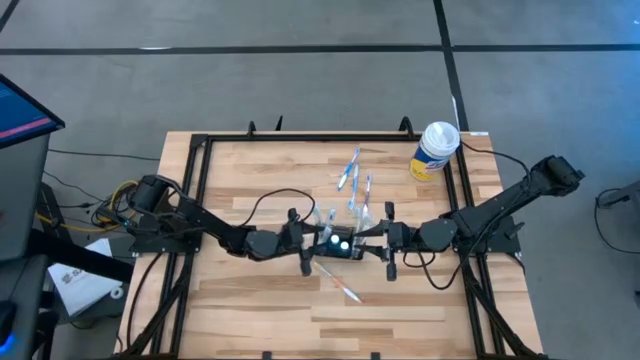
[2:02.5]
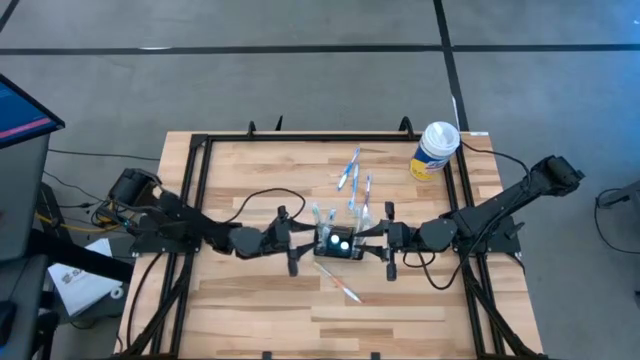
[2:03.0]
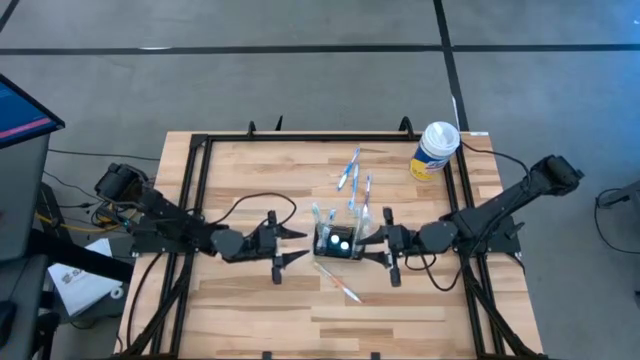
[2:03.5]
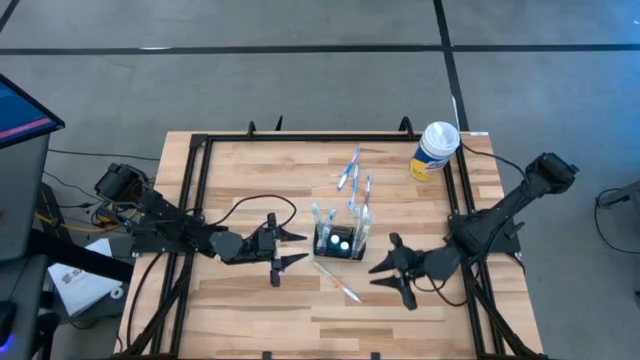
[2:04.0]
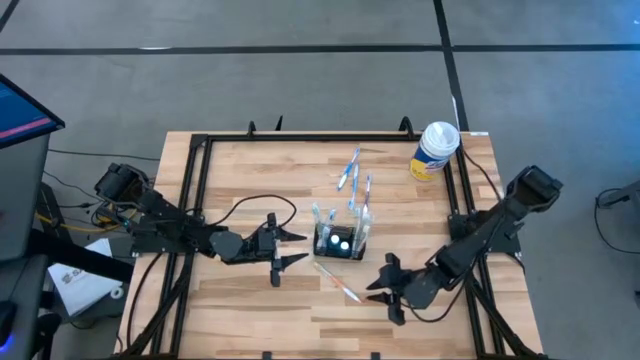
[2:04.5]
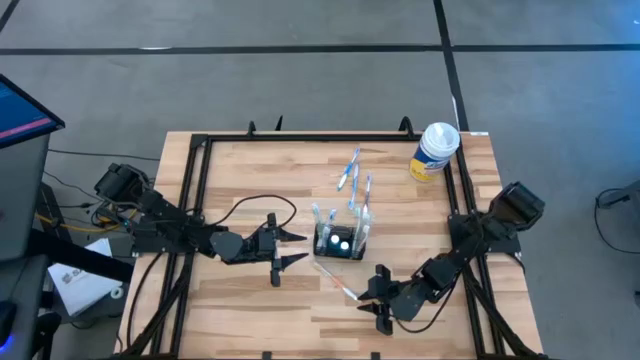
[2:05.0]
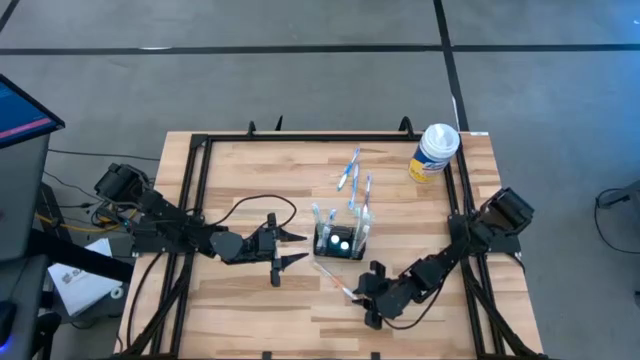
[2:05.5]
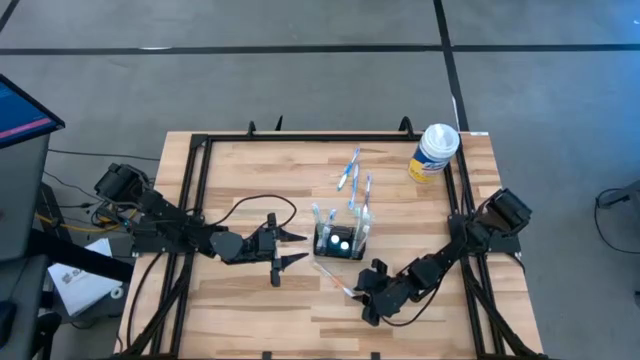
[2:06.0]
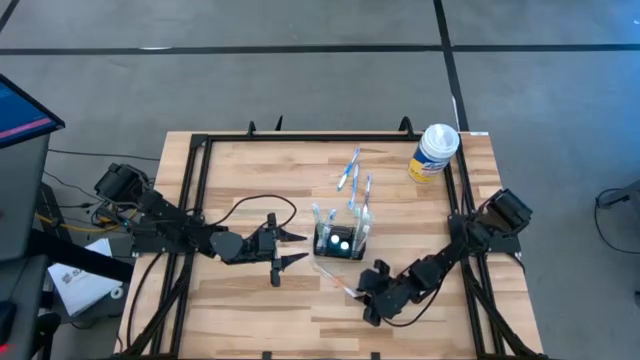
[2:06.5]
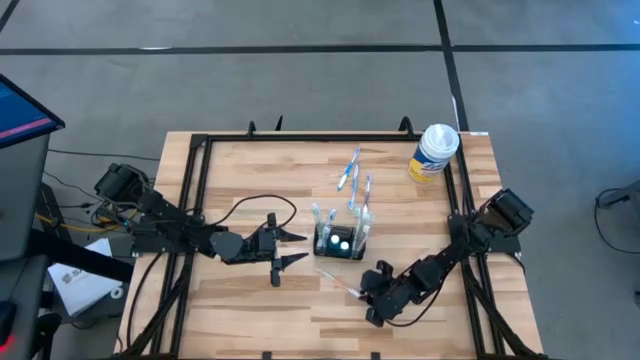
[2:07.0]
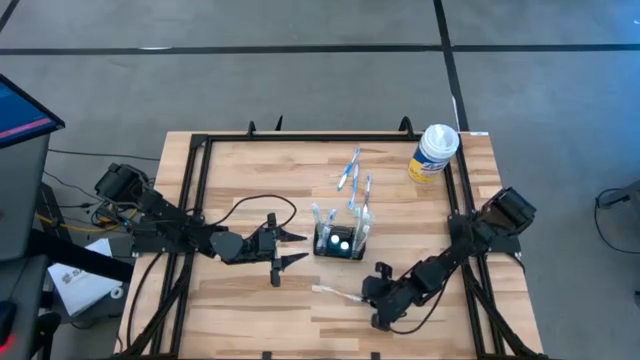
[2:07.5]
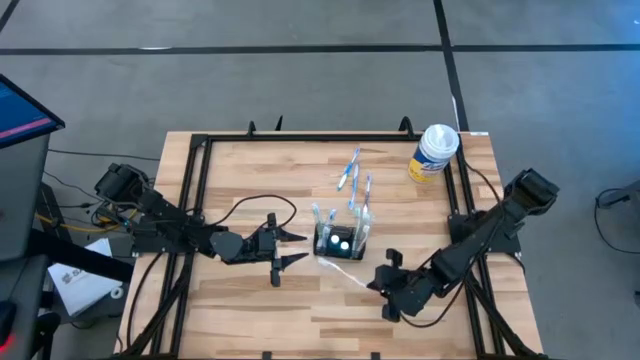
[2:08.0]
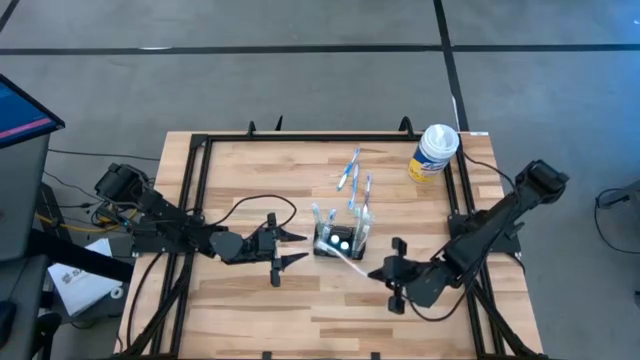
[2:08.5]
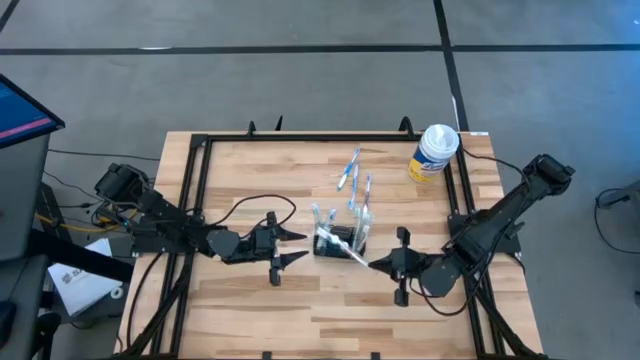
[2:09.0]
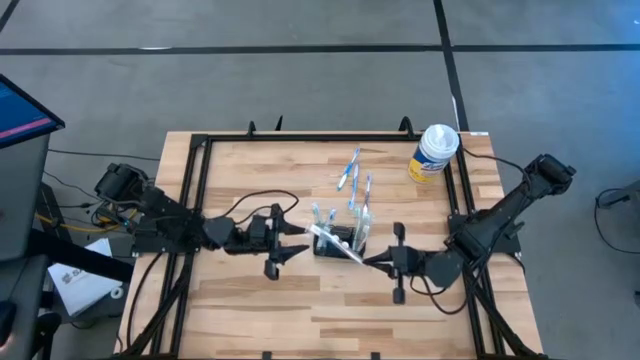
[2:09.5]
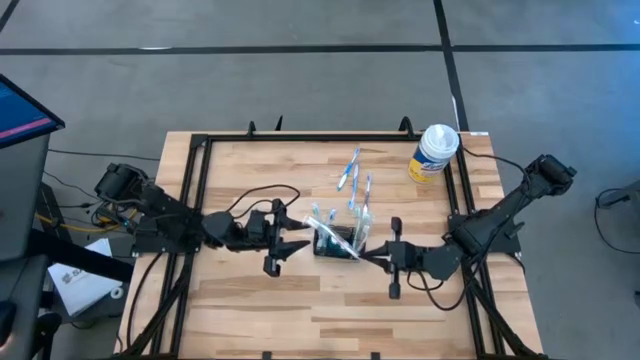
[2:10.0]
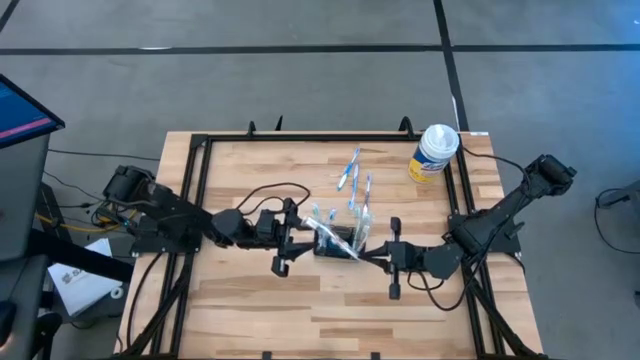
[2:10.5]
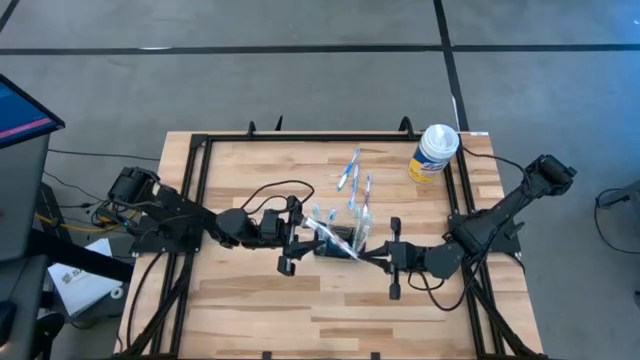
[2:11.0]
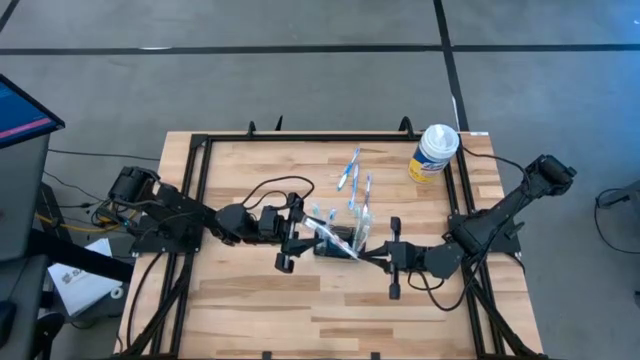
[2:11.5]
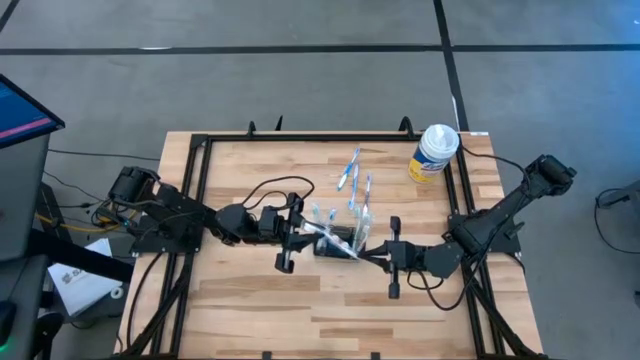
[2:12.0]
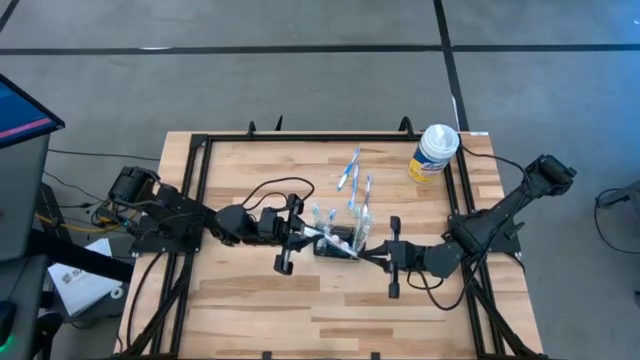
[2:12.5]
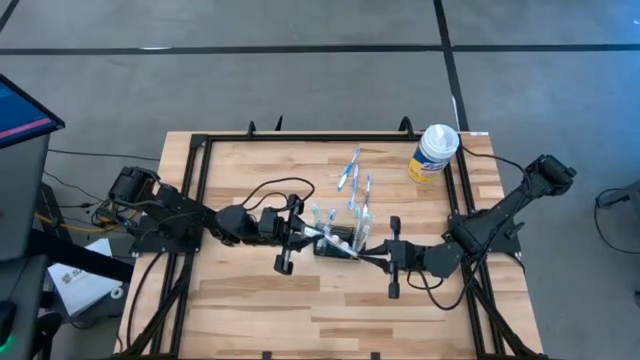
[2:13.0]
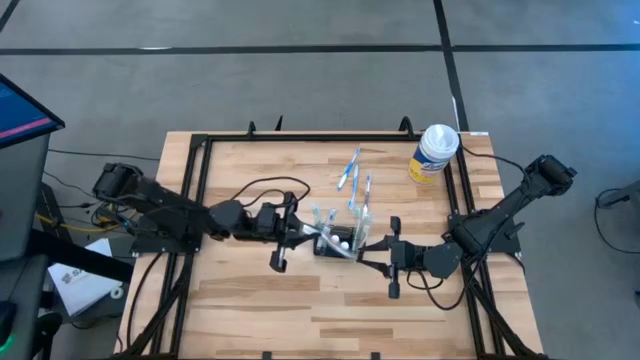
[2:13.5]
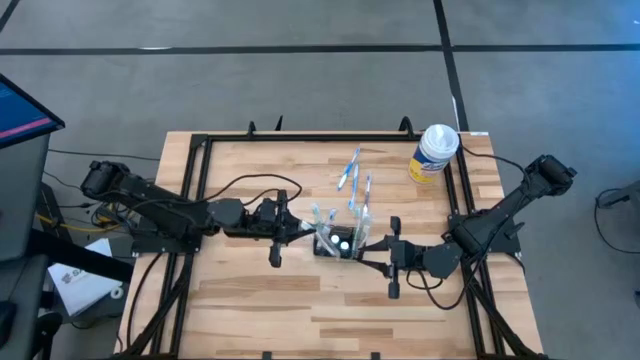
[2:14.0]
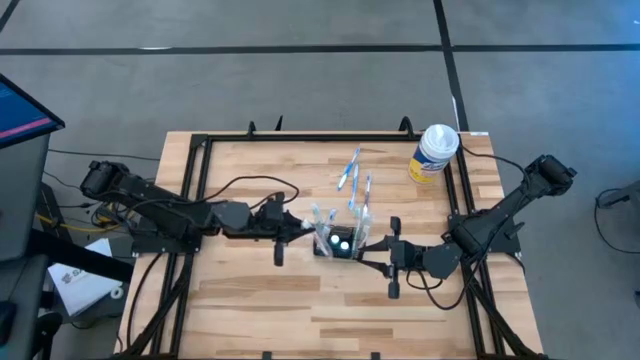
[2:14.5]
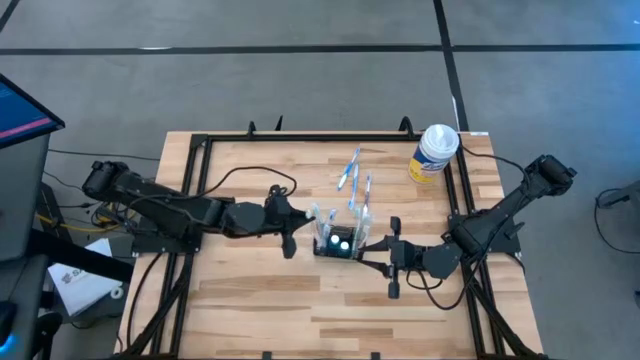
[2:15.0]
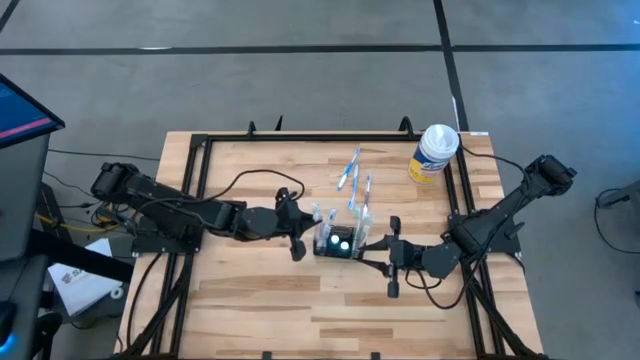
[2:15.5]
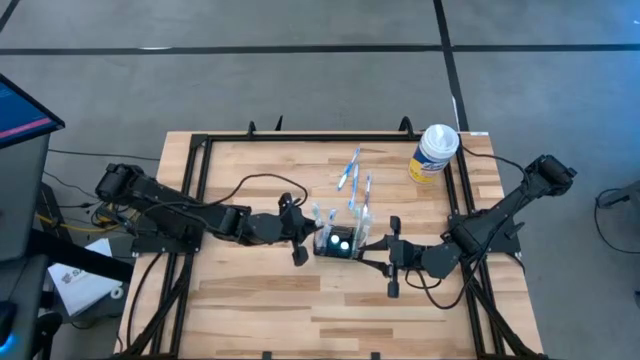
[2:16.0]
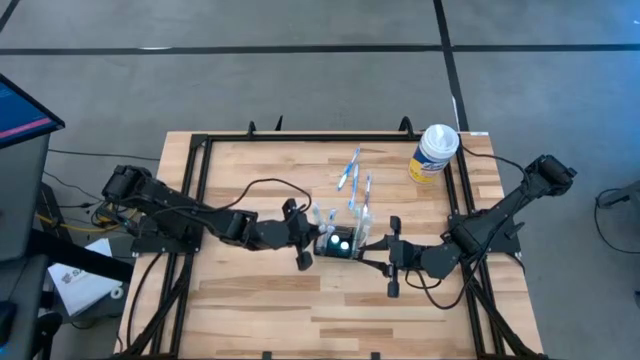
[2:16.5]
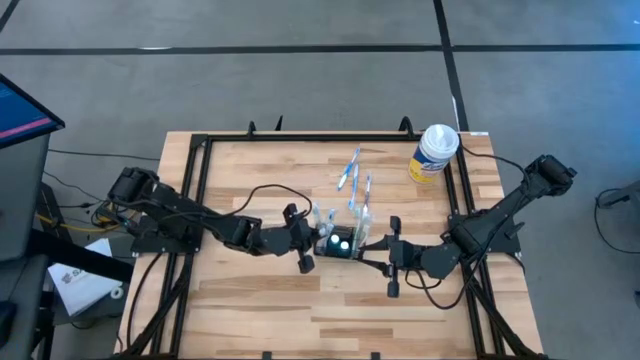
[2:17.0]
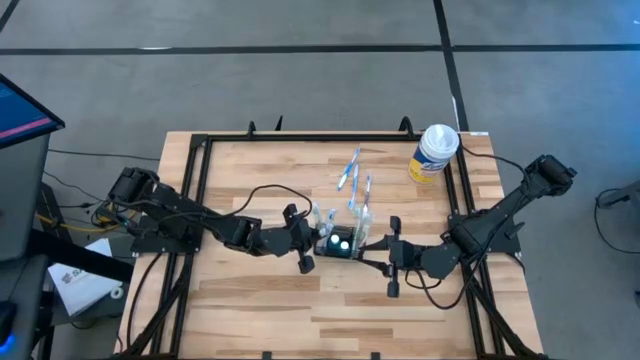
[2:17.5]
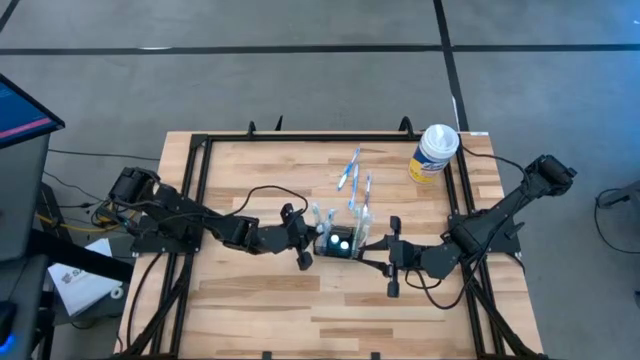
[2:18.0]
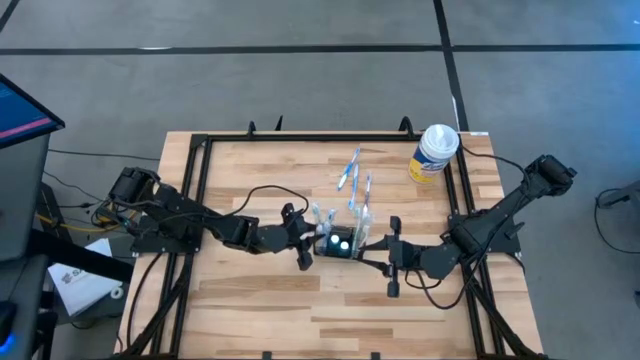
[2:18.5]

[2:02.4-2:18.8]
Task: Pick & Place toothbrushing station
Put the orange toothbrush into the wire organizer

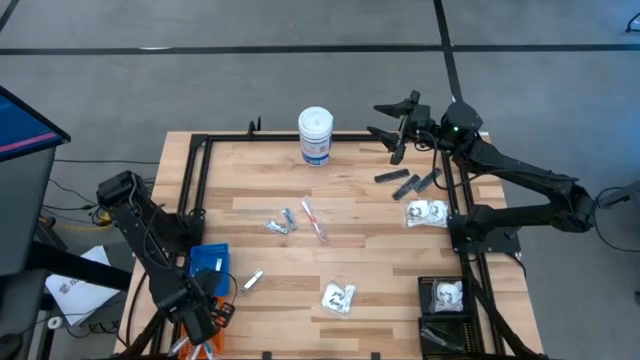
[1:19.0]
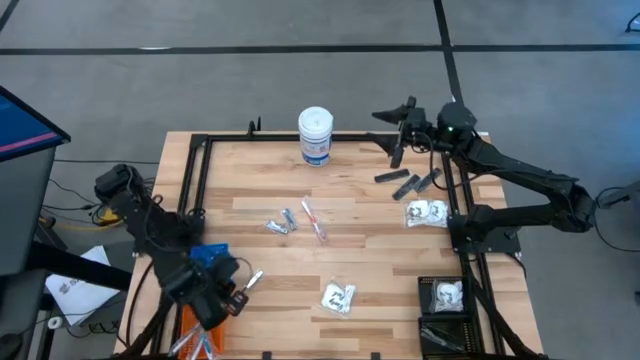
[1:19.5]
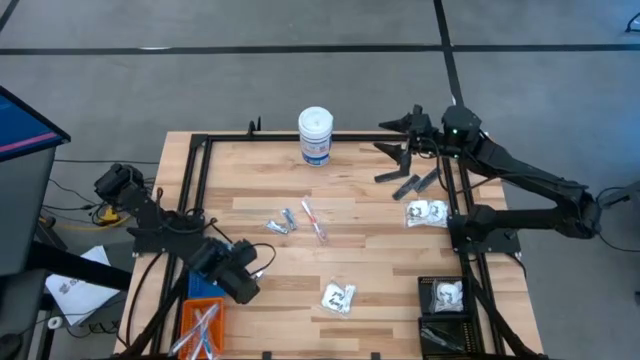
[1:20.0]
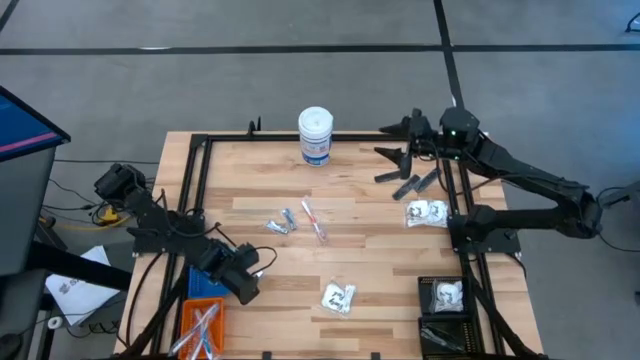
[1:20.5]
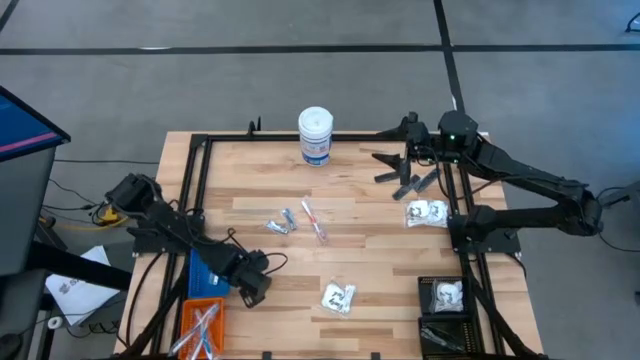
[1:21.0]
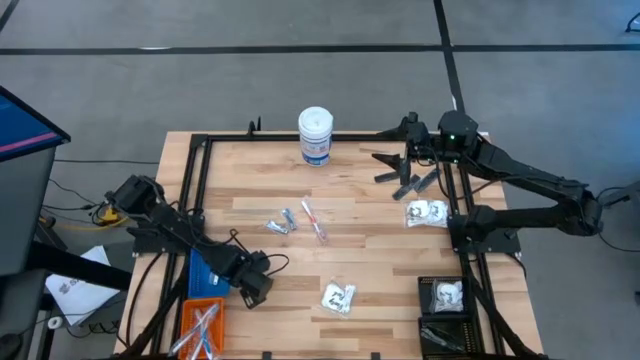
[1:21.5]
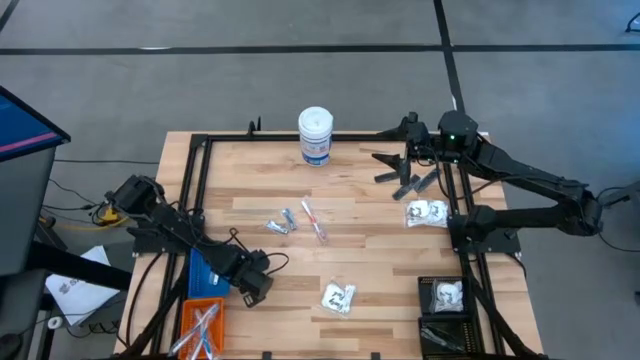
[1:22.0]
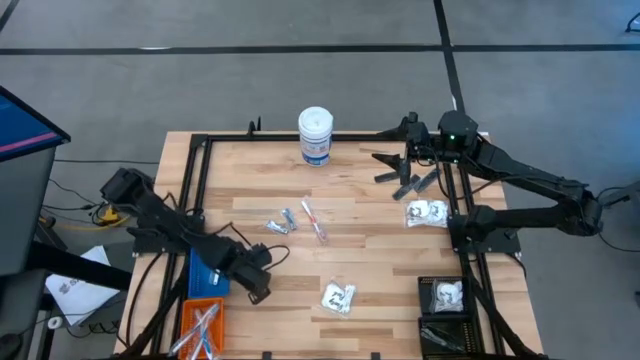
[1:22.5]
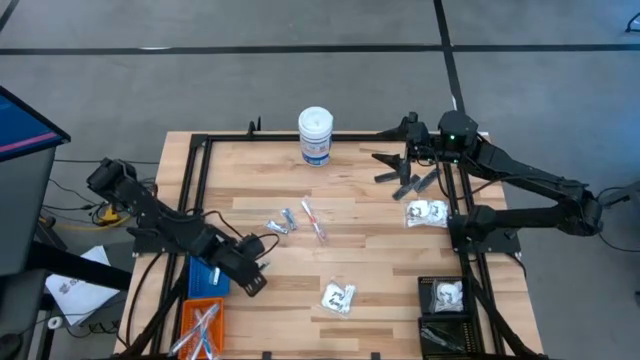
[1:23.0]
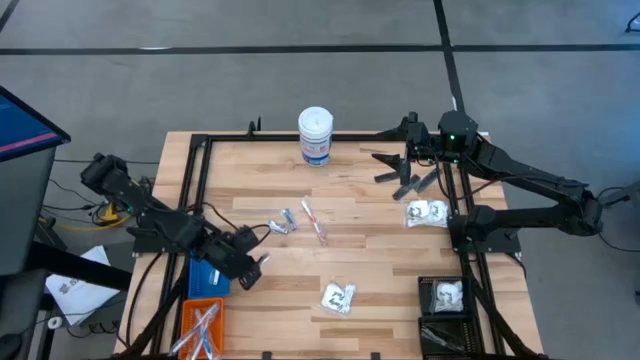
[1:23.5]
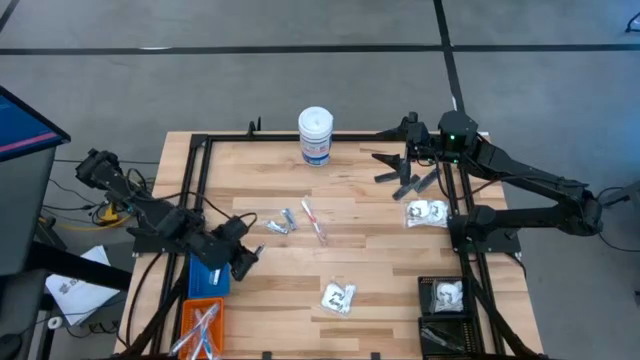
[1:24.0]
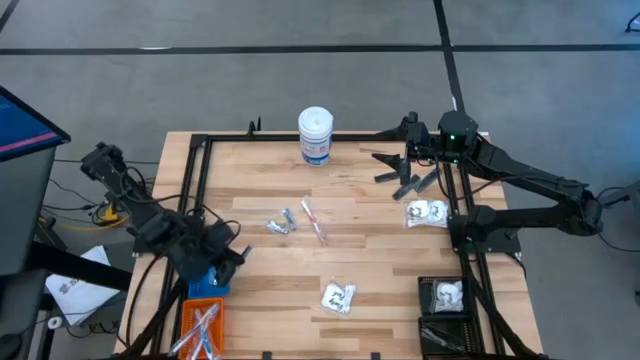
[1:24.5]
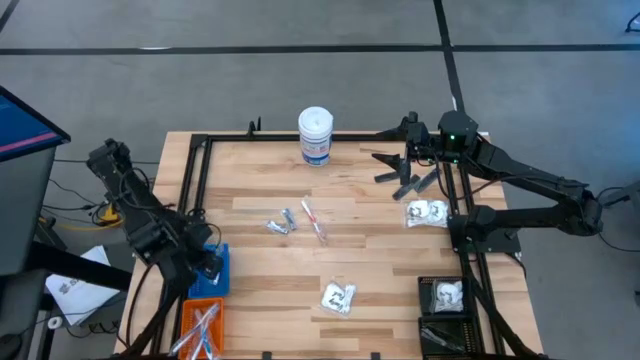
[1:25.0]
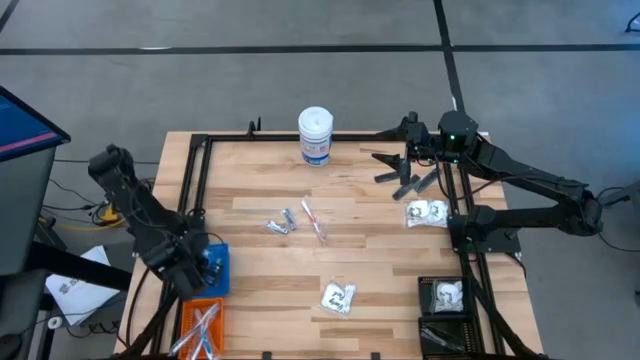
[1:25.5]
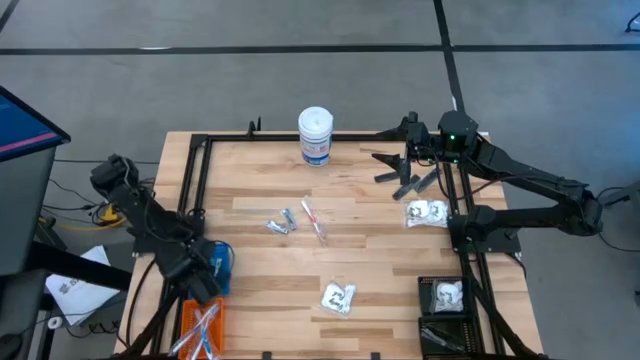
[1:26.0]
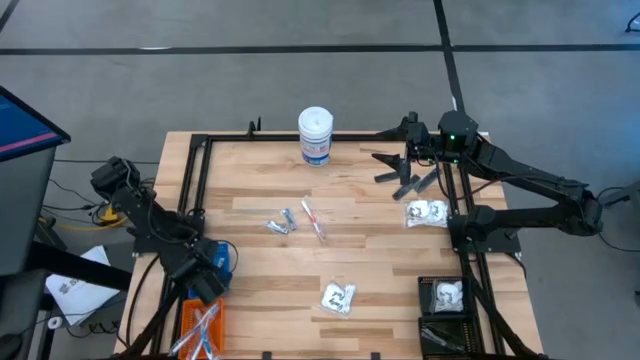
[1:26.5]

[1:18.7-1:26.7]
Task: Pick & Place Travel size toiletries
Put the silver nail clipper into the blue bin
